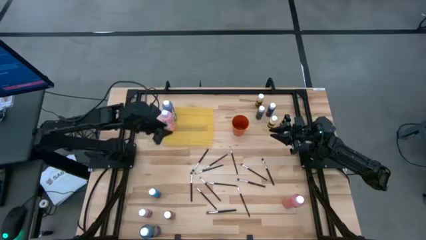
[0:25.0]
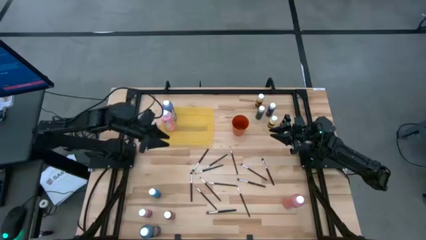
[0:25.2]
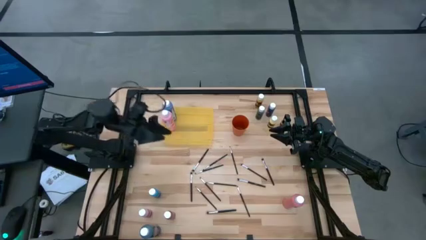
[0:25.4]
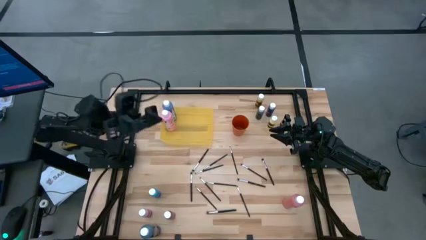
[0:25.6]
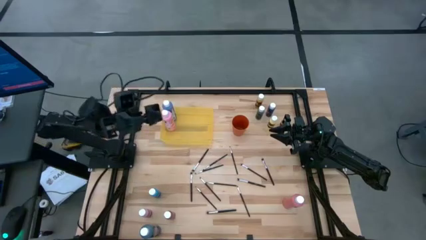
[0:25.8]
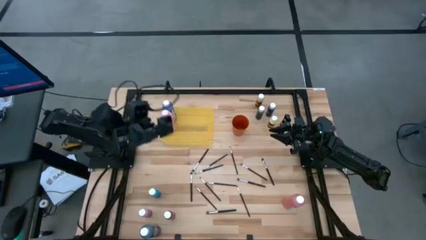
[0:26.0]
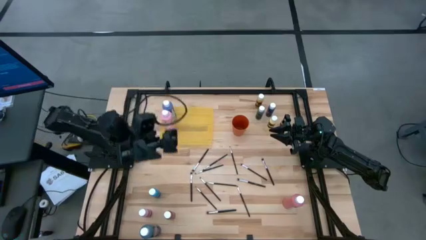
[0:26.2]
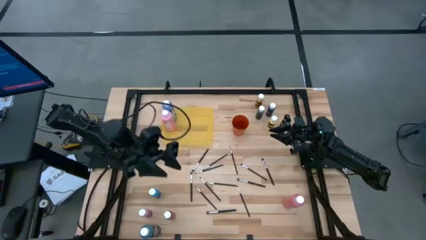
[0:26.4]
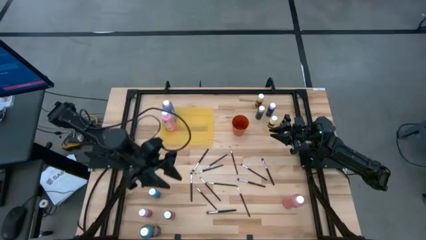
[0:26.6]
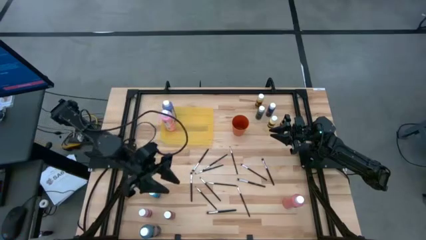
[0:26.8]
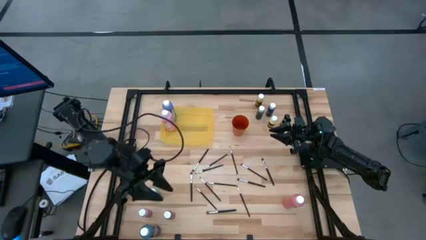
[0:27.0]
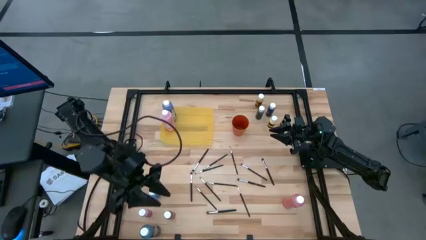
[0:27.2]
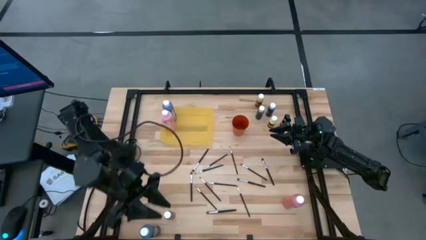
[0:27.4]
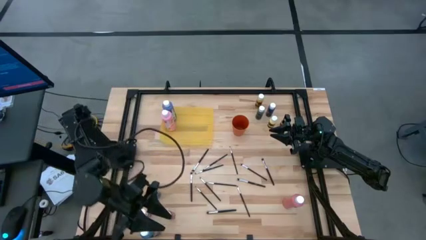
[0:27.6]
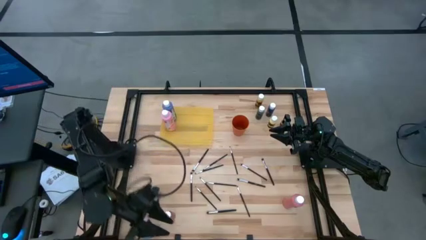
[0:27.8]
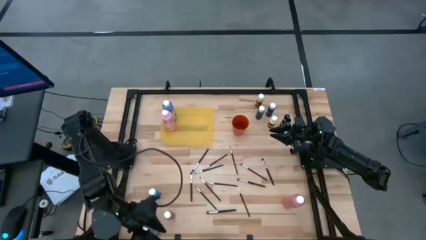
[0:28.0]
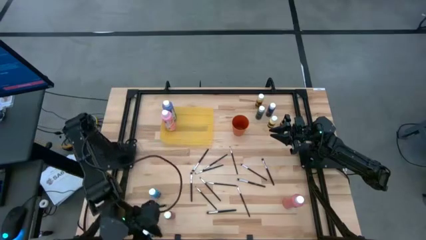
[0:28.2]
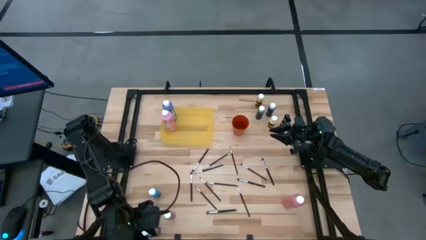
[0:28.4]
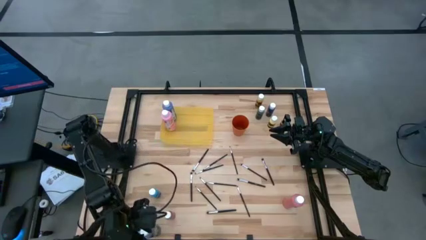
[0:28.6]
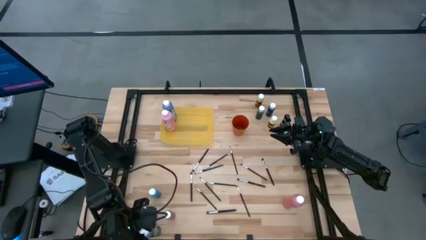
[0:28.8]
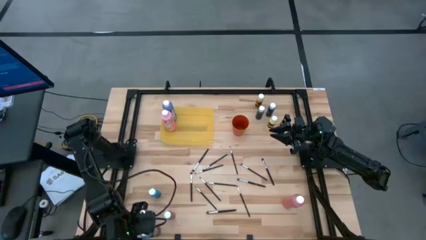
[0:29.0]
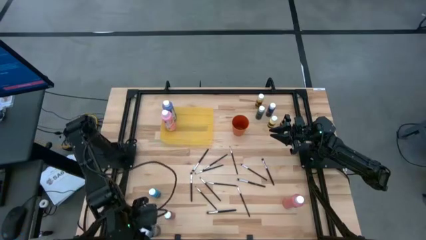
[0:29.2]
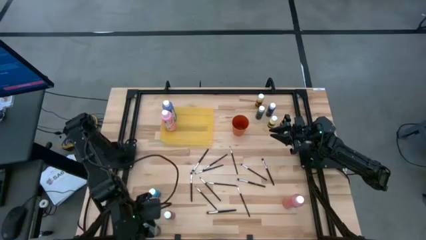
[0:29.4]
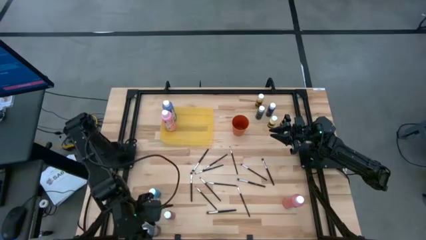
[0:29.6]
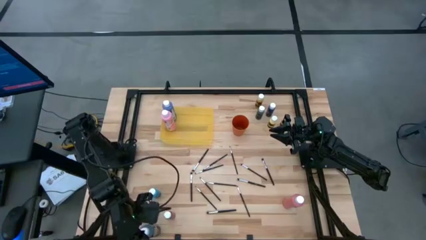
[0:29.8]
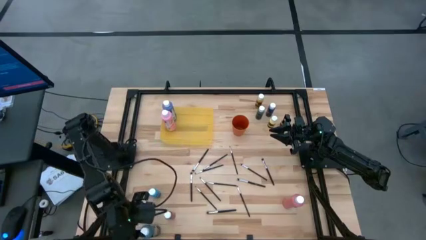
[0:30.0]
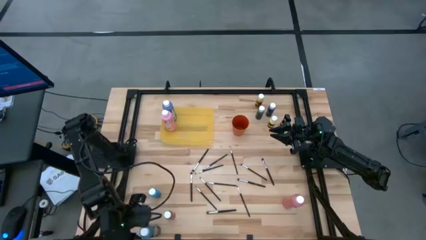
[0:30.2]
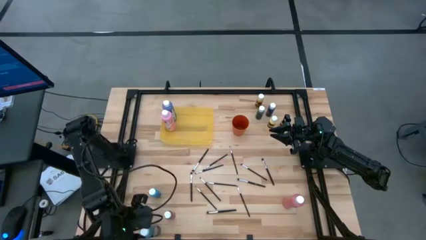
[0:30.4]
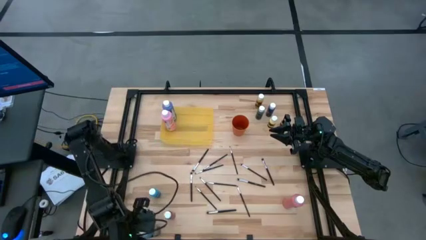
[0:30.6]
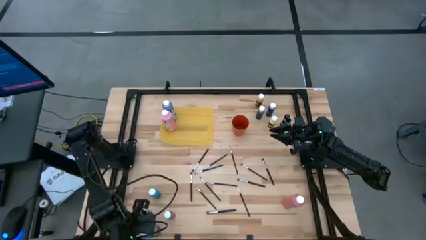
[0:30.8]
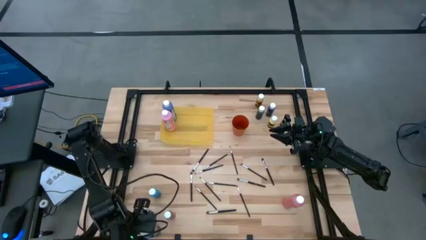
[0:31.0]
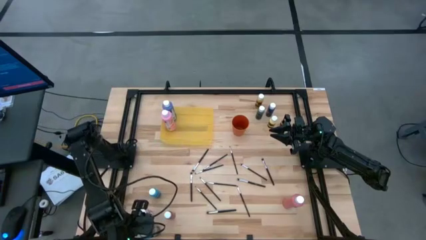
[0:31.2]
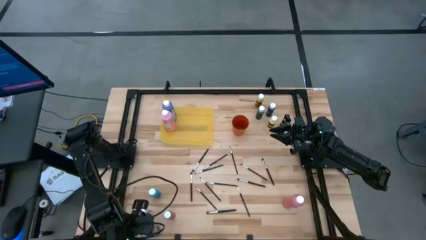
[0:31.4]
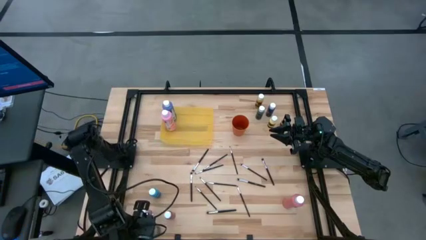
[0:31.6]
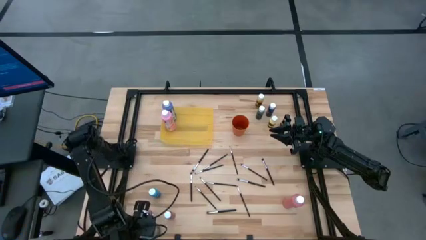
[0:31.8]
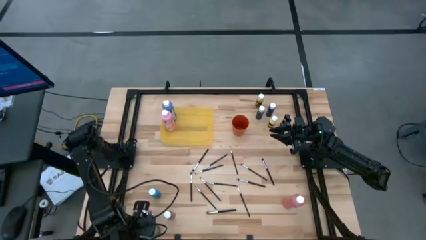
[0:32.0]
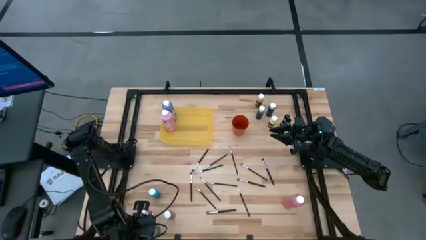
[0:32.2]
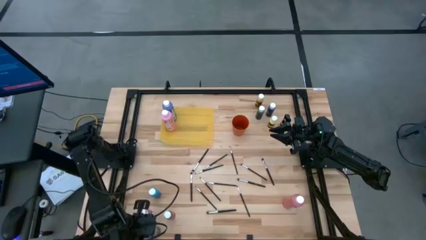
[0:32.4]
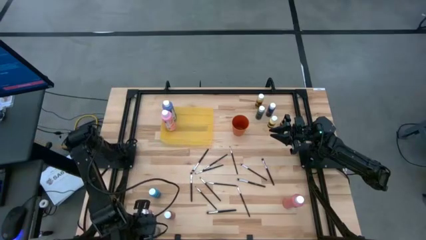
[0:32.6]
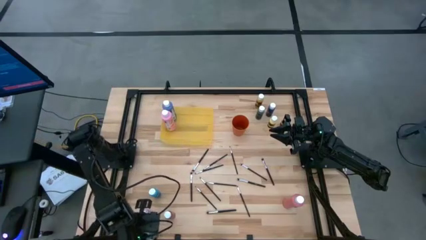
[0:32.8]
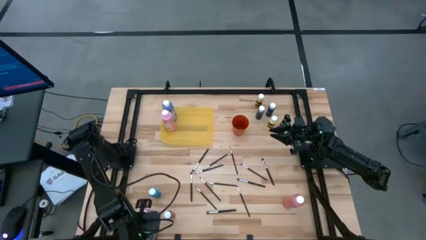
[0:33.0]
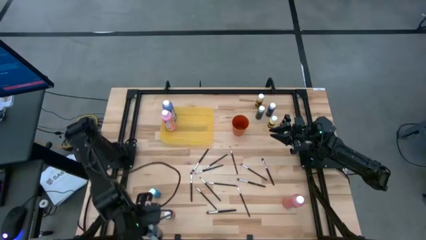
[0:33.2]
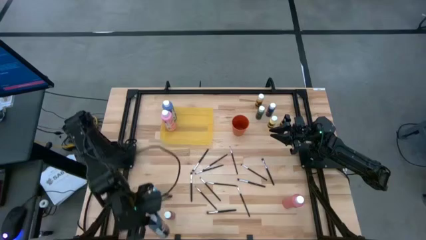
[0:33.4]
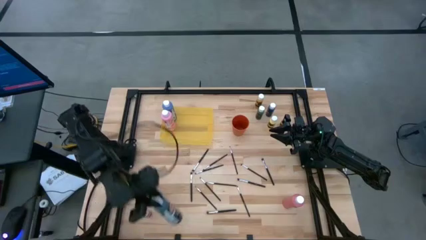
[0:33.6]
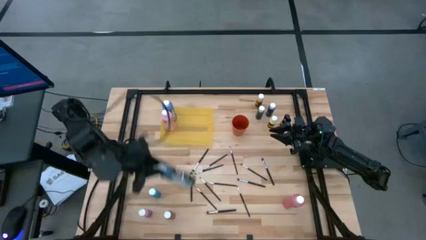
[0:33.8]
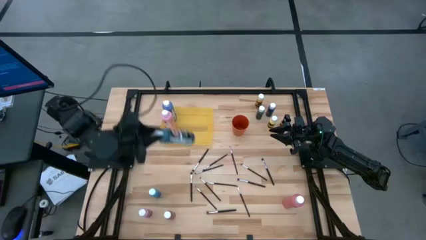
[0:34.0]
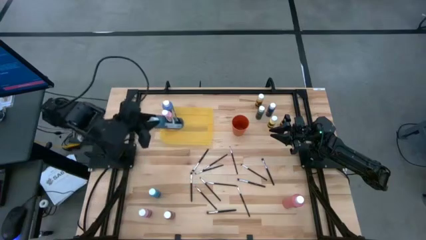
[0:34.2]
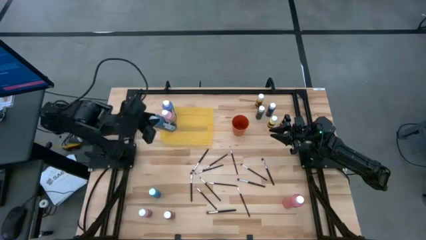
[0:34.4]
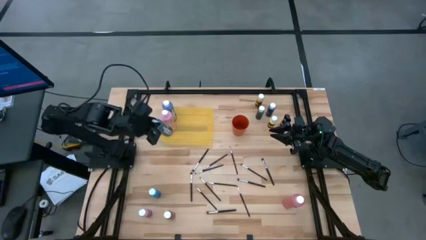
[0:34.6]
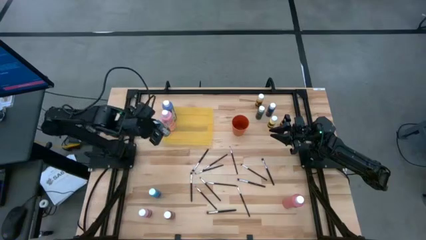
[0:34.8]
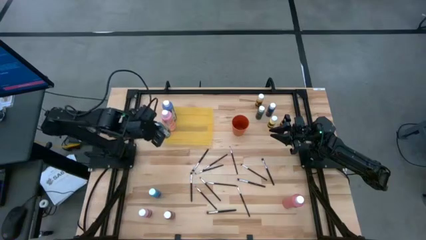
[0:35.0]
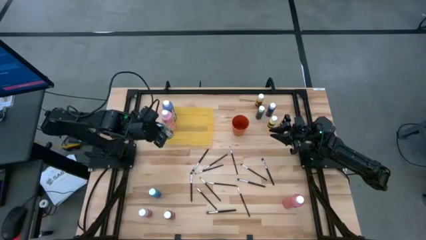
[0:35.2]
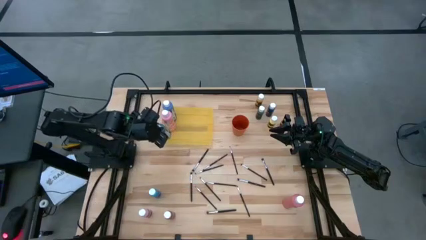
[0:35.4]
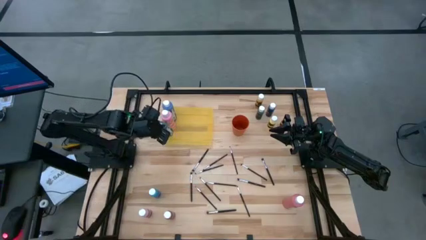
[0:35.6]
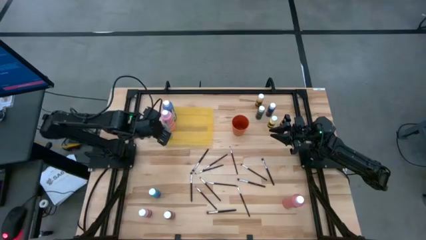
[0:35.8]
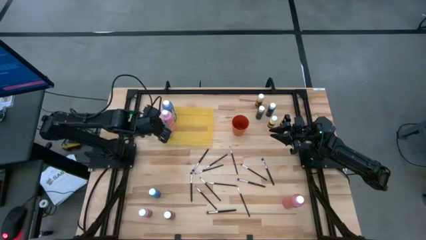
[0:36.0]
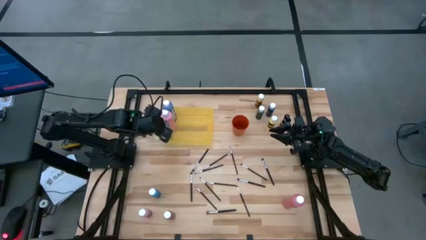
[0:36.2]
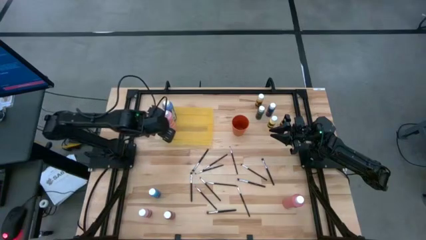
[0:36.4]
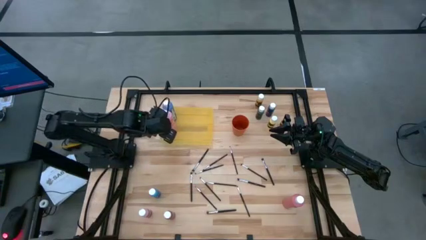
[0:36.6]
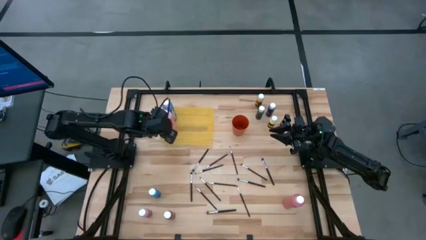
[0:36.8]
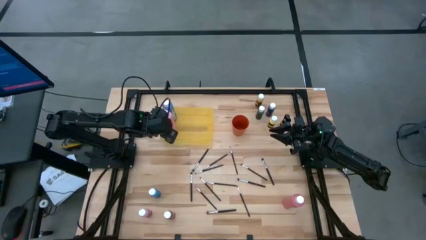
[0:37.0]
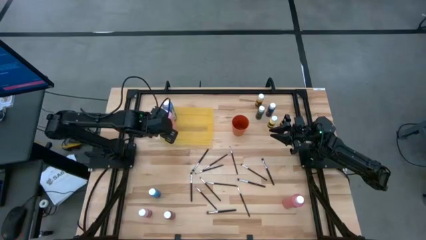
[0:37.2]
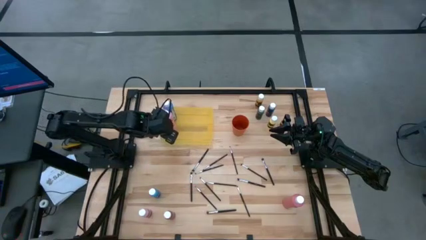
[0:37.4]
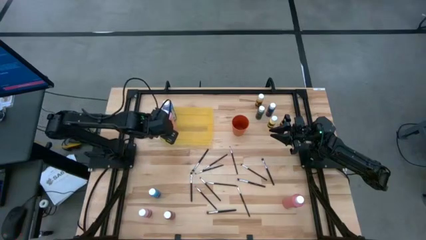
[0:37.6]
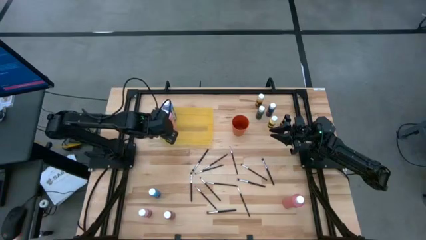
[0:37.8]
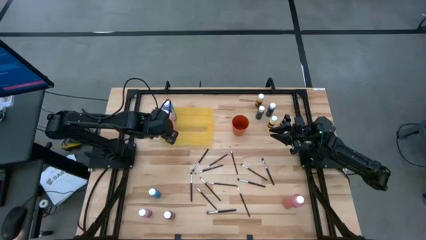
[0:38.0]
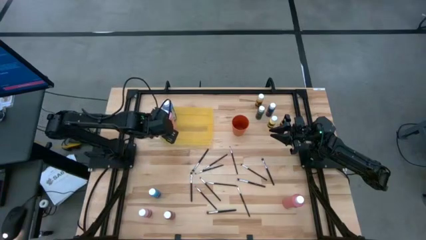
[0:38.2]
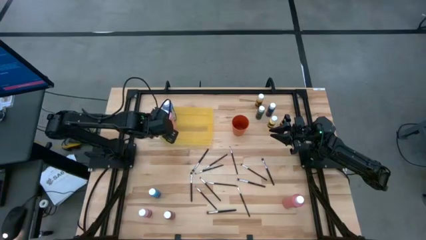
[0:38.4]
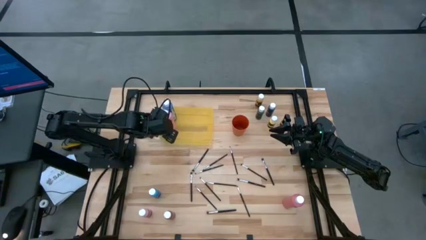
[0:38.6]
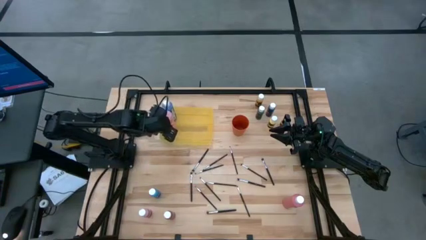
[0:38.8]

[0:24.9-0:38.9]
Task: Pick & Place Paint Supplies
Put the black paint bottle into the yellow bin
